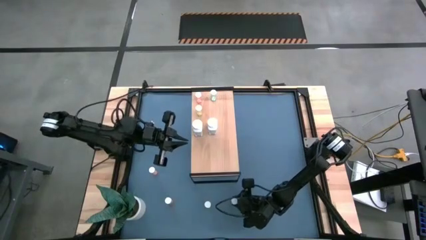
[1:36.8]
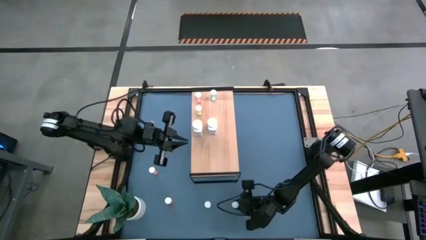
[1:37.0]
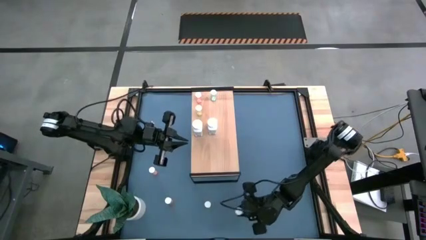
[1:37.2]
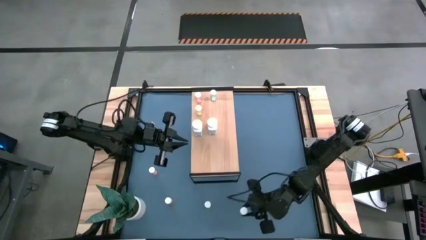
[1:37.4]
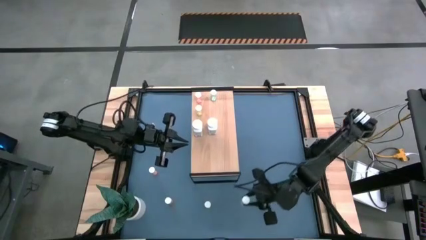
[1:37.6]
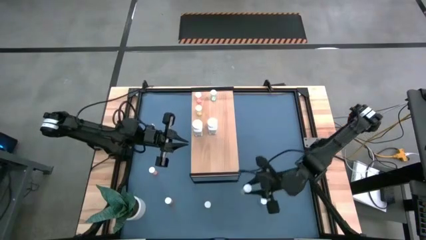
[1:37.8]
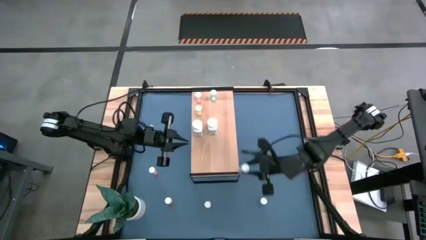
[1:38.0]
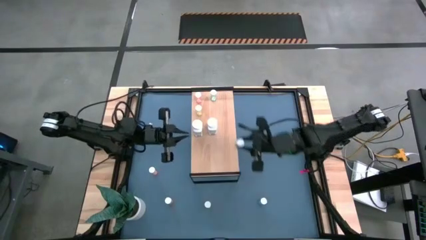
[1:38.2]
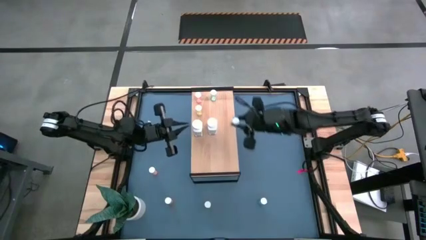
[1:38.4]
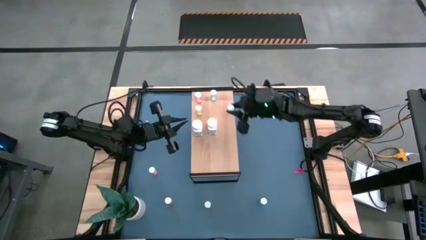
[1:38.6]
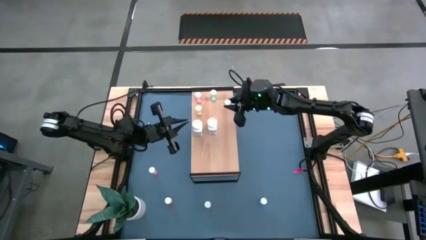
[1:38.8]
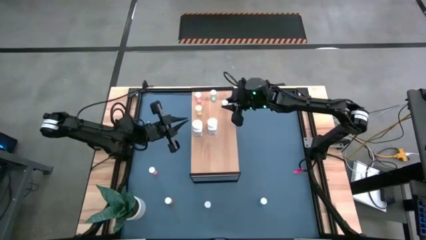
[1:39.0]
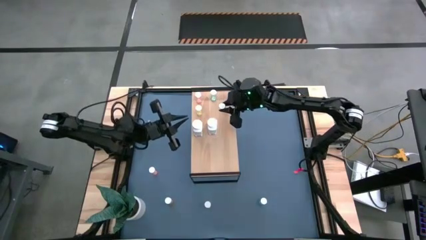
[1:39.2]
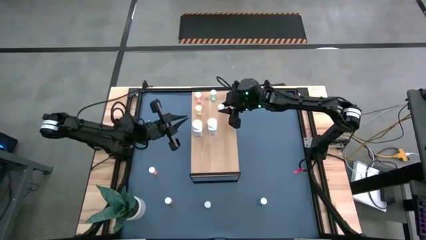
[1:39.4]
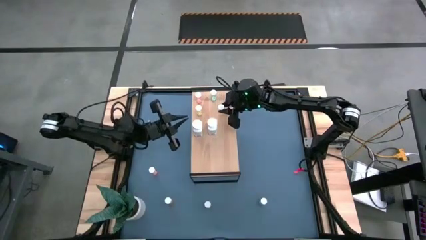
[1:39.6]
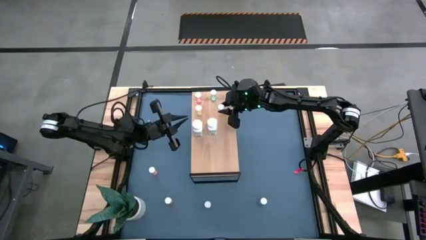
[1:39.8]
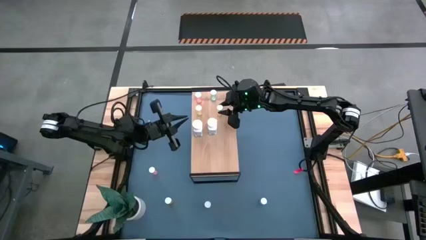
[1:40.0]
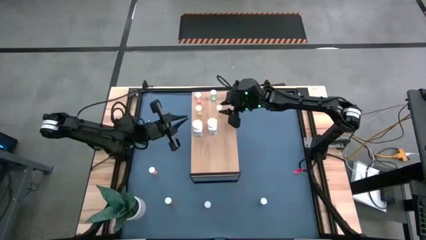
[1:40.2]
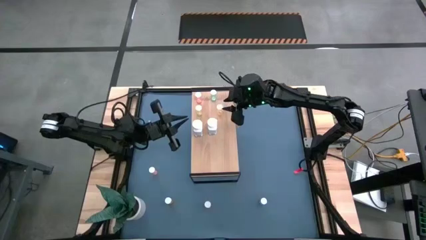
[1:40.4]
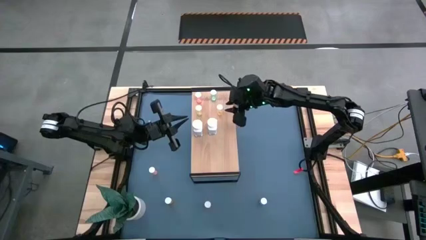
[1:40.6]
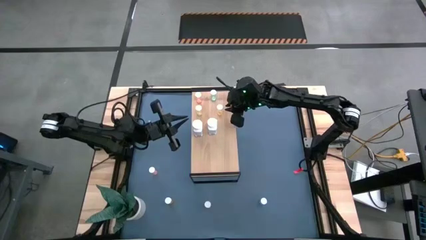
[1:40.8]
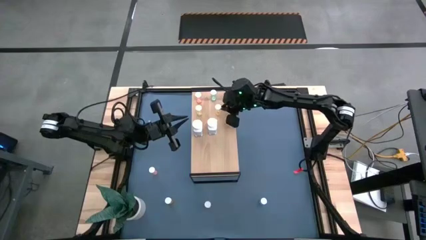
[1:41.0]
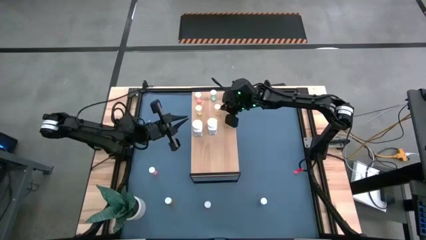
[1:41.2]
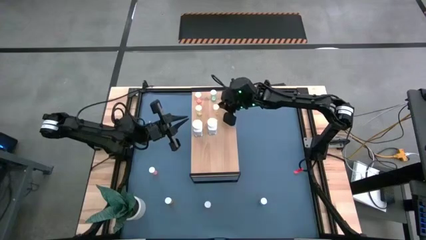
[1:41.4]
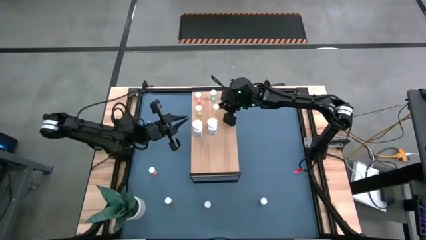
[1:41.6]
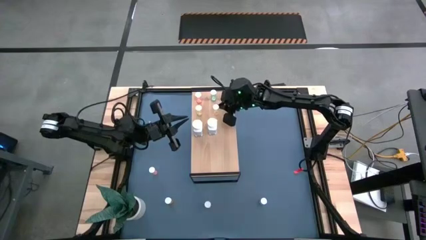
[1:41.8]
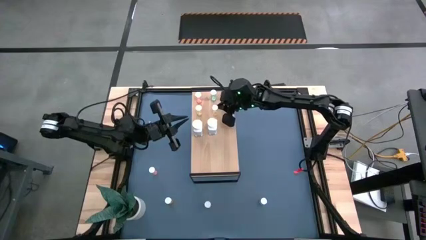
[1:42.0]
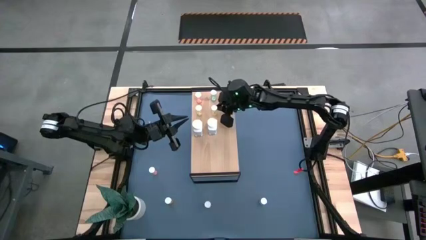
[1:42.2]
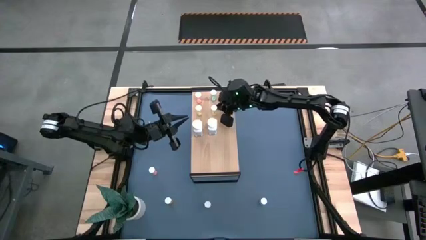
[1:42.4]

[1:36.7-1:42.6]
Task: Pick and place medicine bottles onto shelf by color
Put the yellow pill bottle on the shelf aligned with the yellow pill bottle

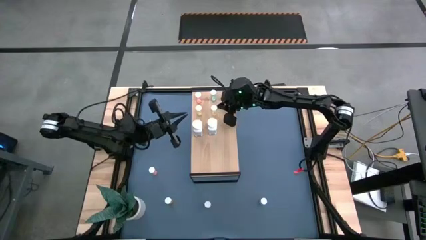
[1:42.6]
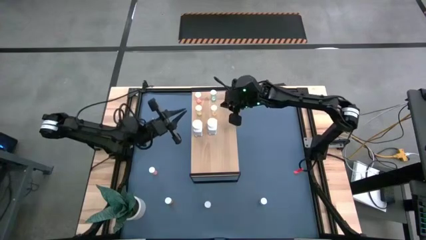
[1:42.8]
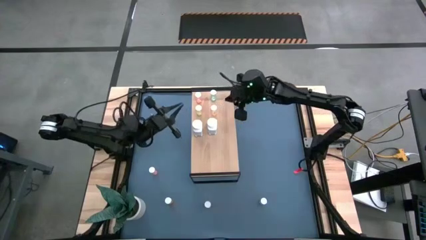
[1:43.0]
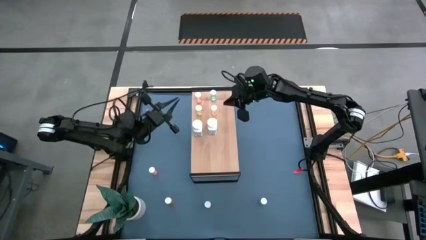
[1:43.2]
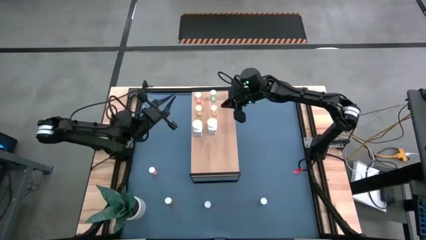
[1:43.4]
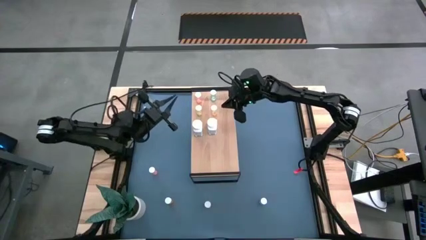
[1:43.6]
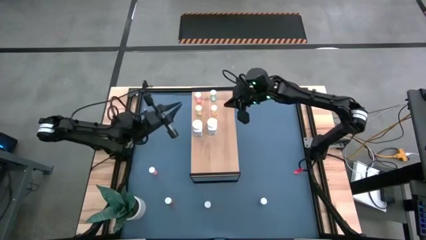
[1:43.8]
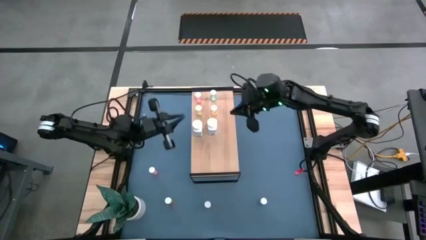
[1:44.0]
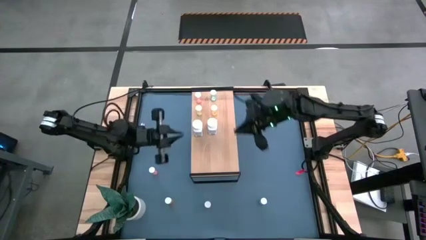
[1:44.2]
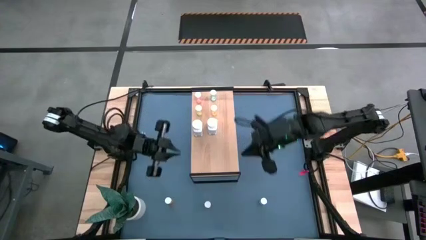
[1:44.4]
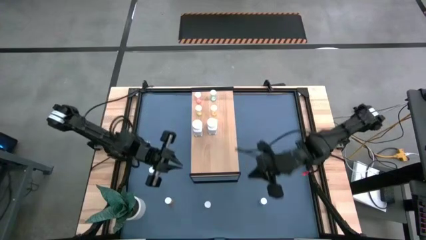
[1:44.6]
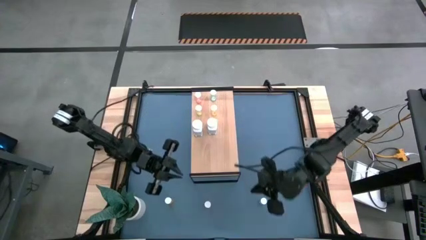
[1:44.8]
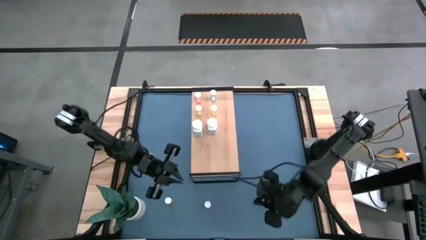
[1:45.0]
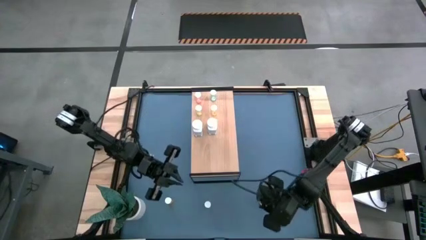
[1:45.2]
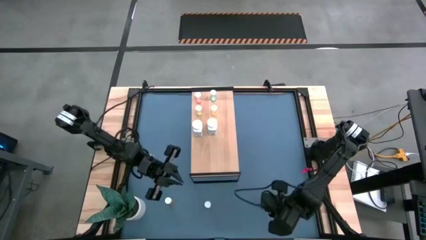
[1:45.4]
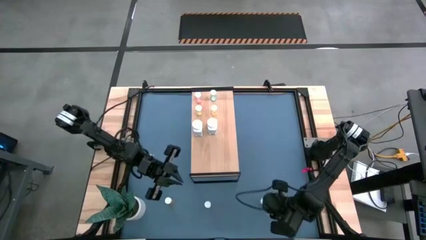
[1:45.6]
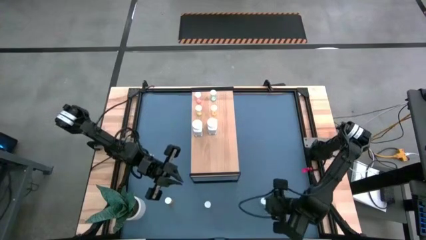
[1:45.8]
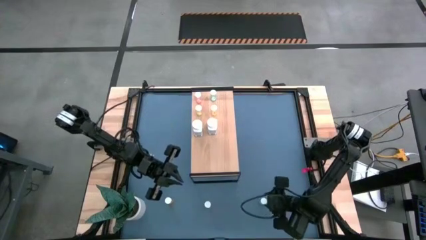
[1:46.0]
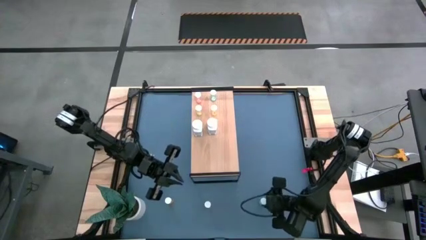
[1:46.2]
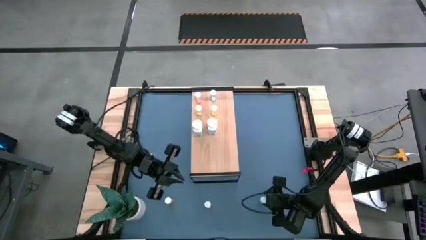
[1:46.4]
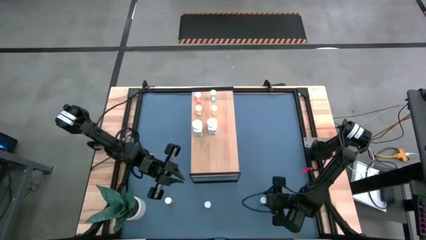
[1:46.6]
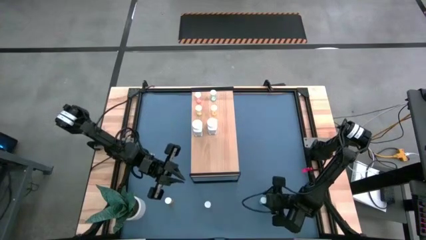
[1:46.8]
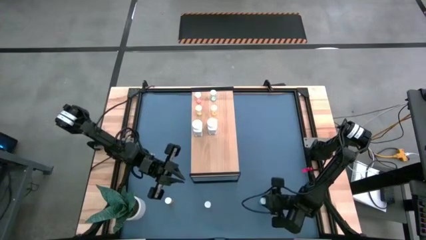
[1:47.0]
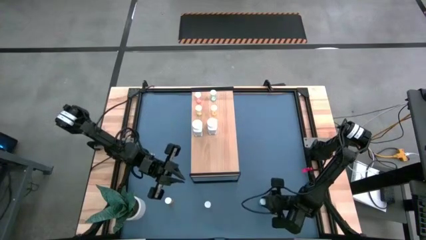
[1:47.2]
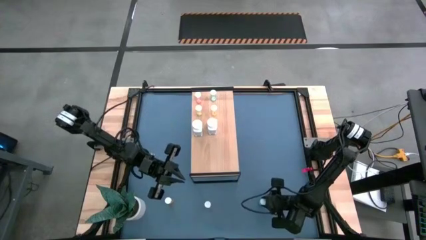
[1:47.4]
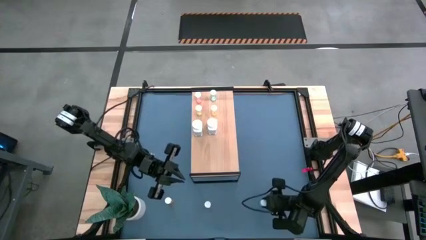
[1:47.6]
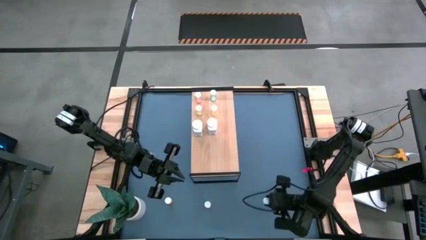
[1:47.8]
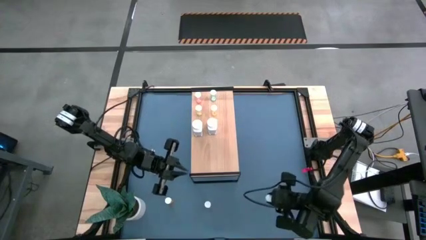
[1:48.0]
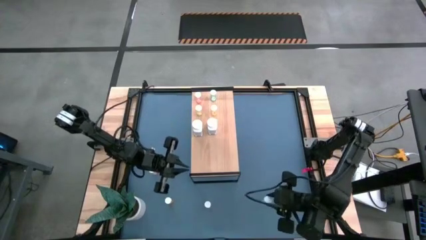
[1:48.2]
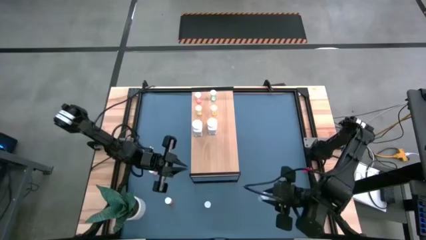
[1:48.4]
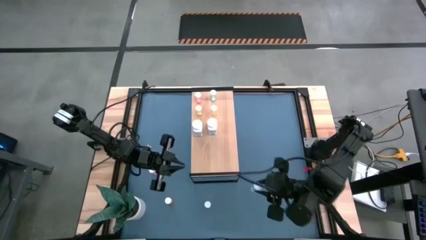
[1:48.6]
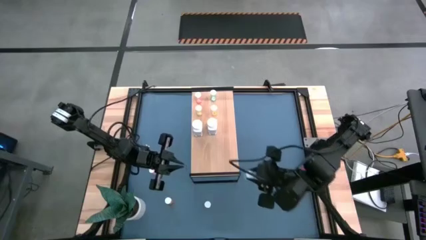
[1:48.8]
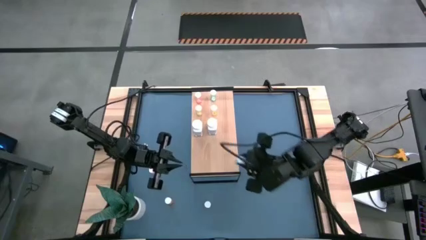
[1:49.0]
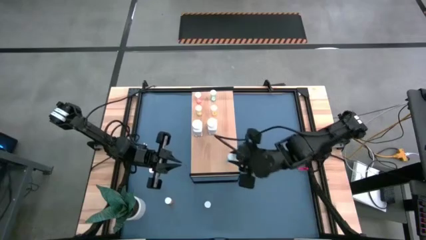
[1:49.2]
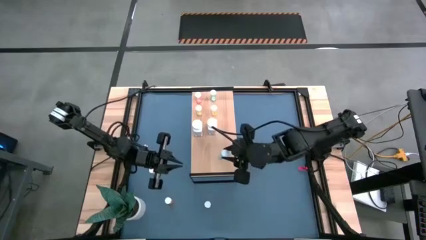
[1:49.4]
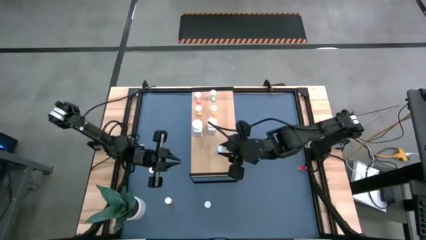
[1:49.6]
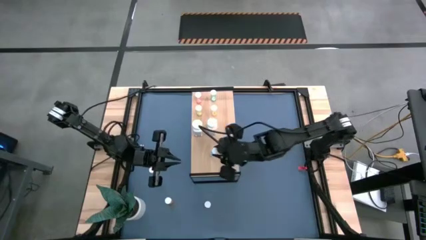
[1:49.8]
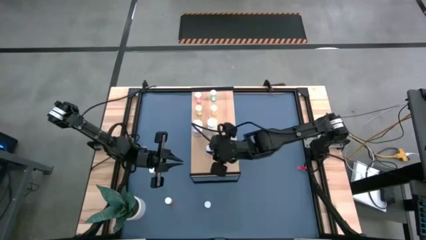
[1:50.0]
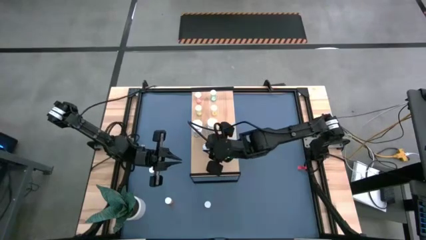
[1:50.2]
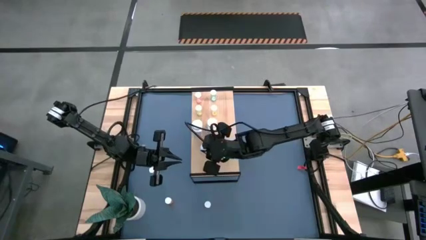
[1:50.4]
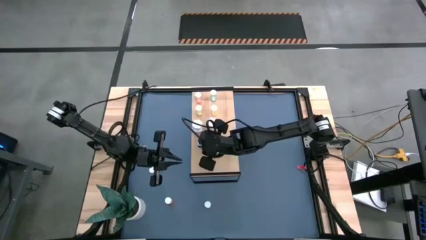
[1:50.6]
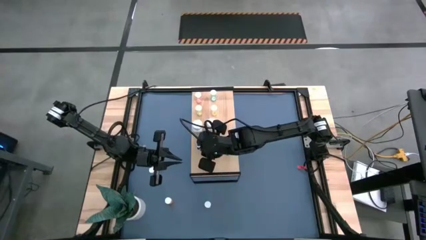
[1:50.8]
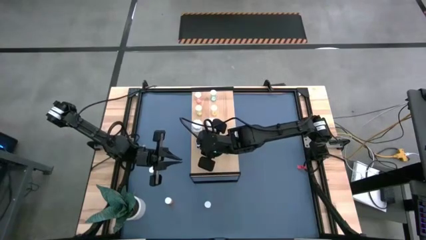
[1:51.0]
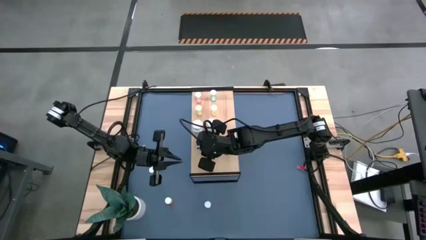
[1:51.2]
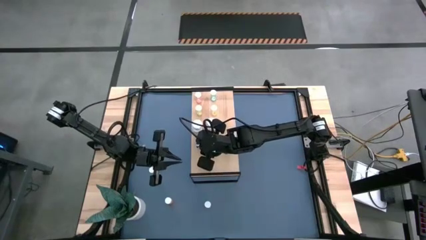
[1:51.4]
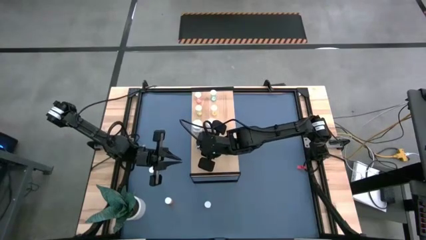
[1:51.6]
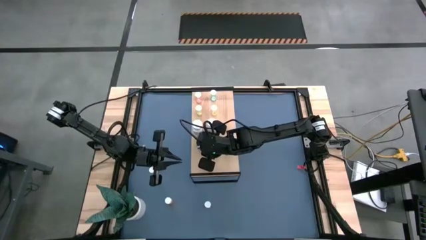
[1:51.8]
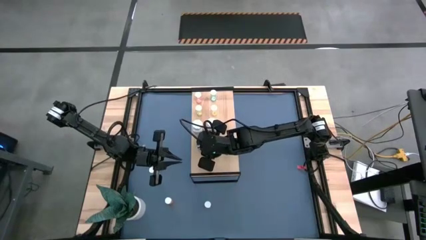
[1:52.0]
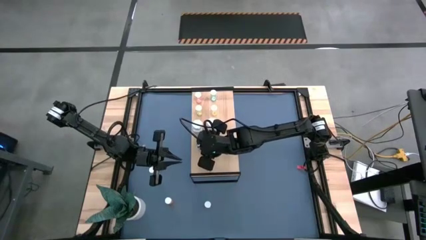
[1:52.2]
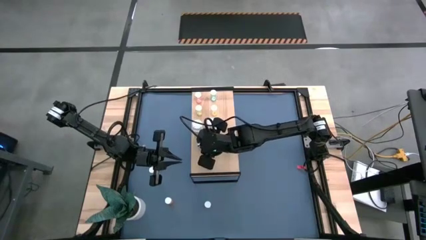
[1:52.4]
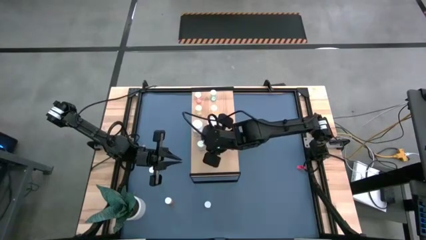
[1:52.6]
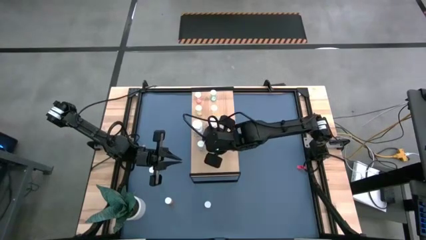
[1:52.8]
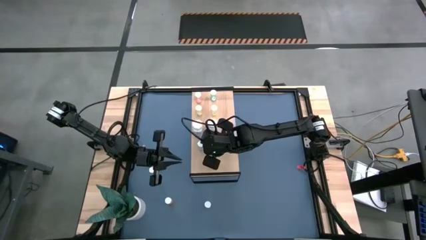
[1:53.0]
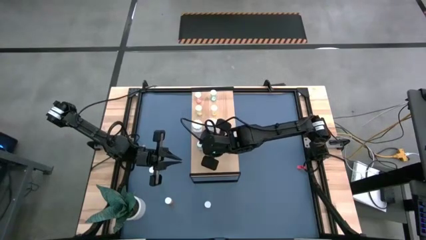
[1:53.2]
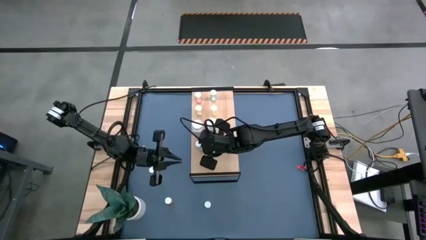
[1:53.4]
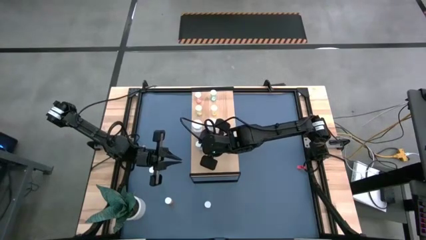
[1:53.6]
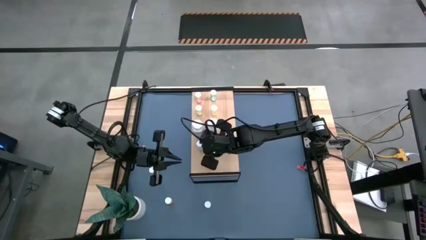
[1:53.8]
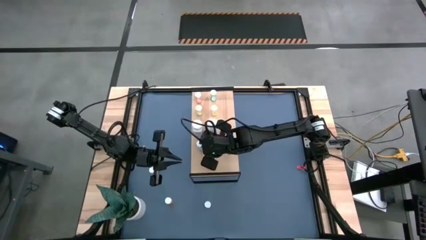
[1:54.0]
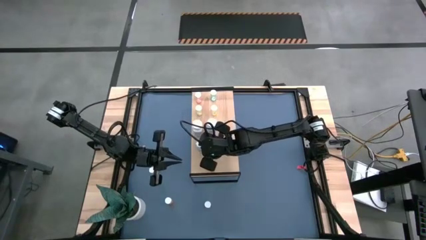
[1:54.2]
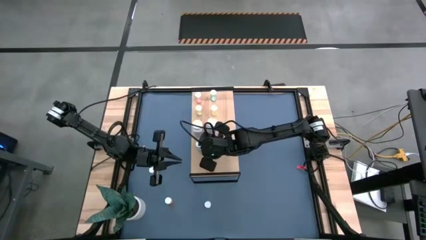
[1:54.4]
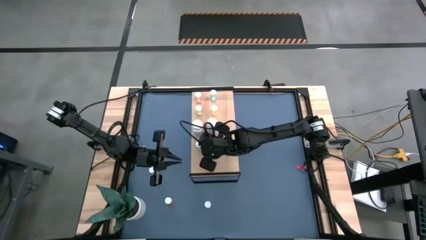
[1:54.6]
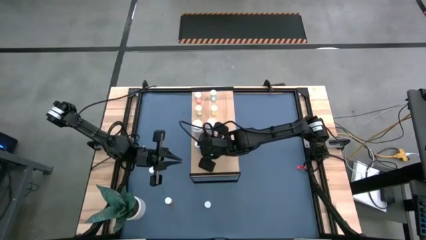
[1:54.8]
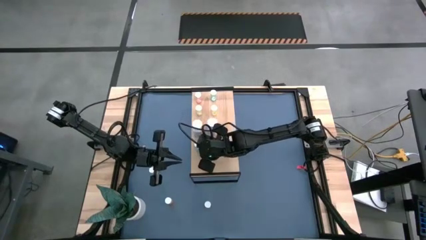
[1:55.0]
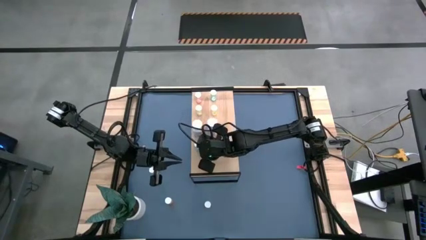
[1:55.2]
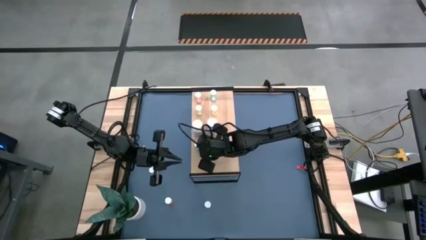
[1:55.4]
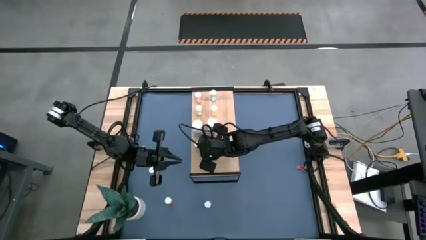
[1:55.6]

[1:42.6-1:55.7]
Put the blue pill bottle on the shelf
